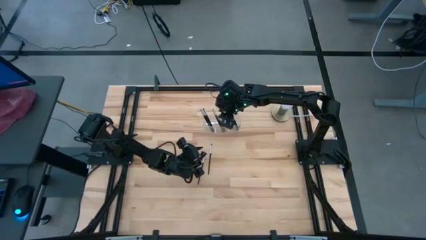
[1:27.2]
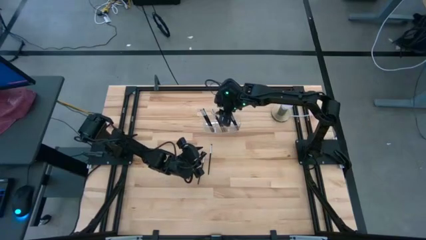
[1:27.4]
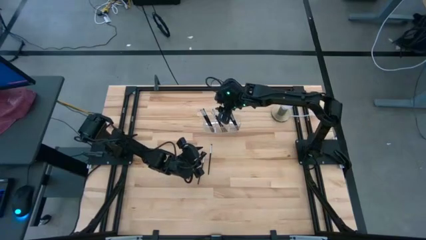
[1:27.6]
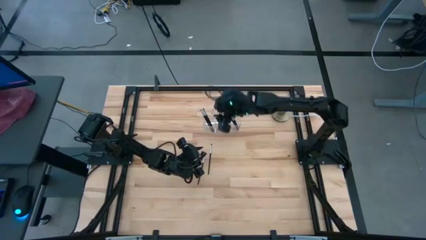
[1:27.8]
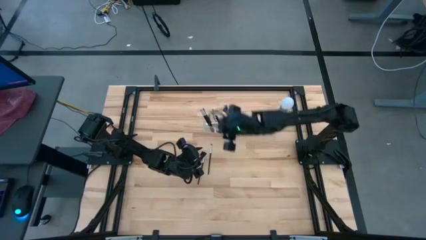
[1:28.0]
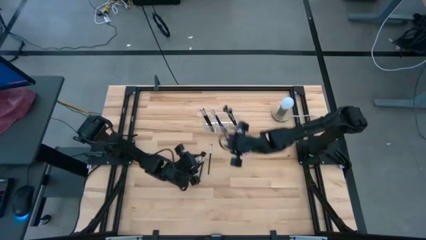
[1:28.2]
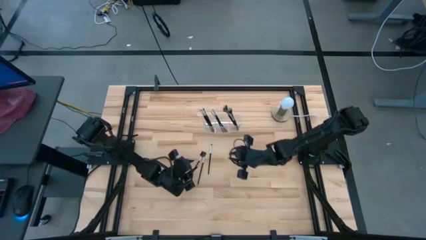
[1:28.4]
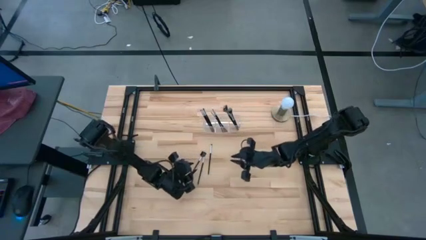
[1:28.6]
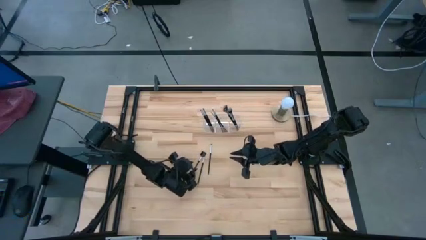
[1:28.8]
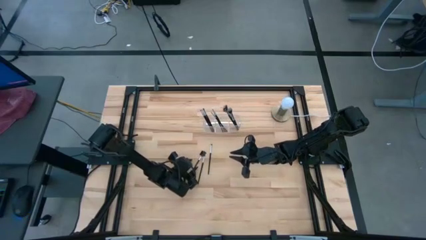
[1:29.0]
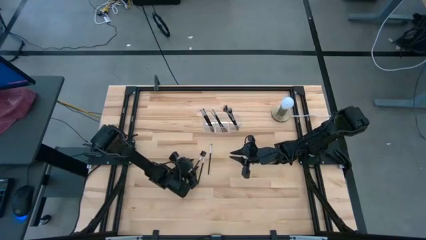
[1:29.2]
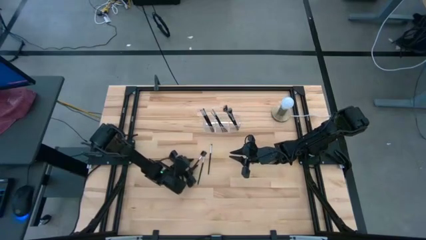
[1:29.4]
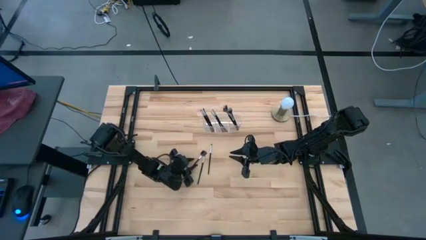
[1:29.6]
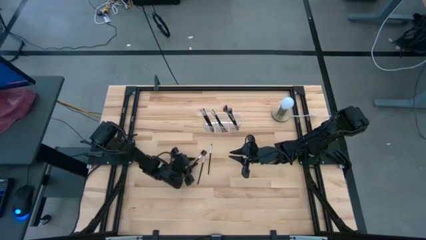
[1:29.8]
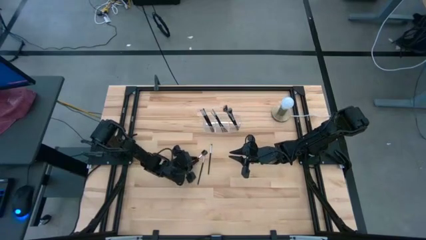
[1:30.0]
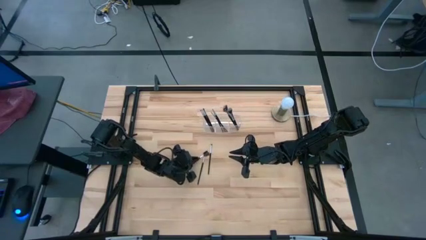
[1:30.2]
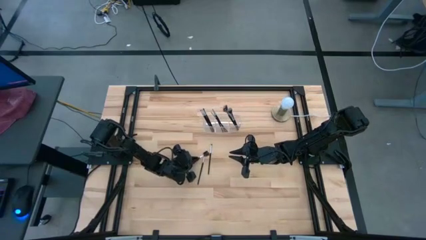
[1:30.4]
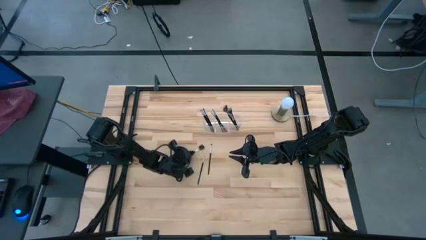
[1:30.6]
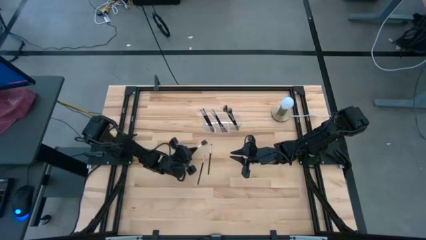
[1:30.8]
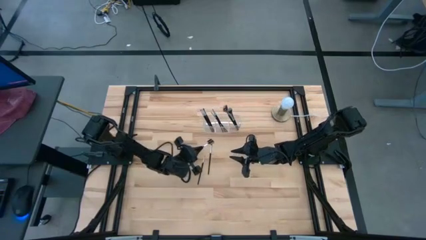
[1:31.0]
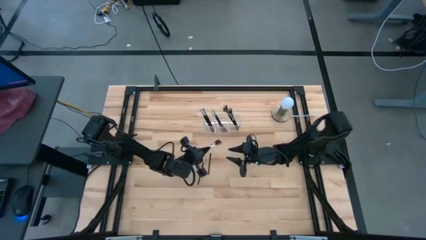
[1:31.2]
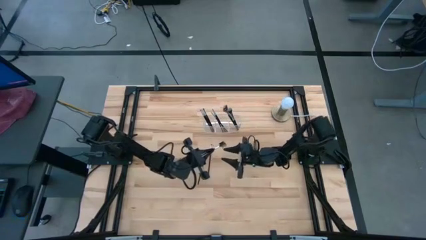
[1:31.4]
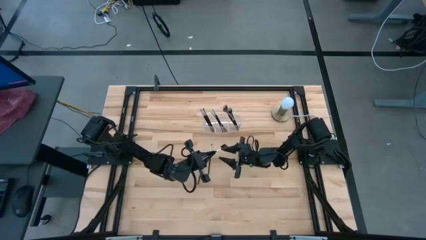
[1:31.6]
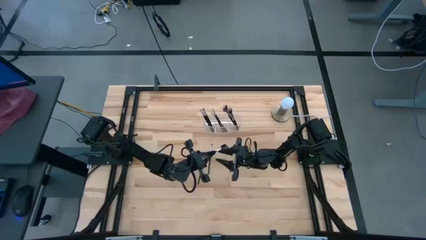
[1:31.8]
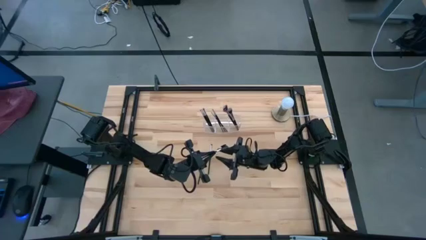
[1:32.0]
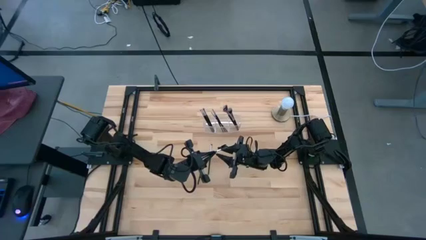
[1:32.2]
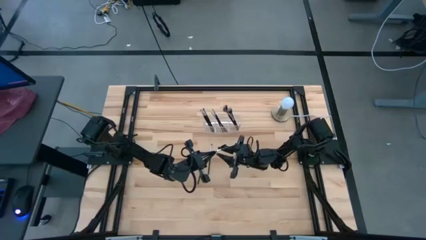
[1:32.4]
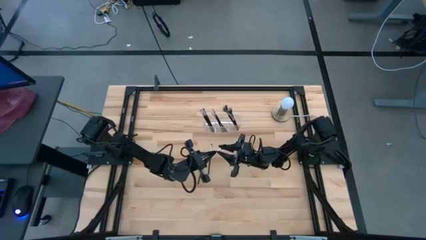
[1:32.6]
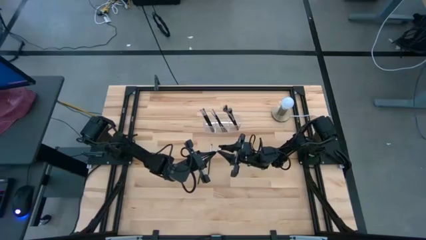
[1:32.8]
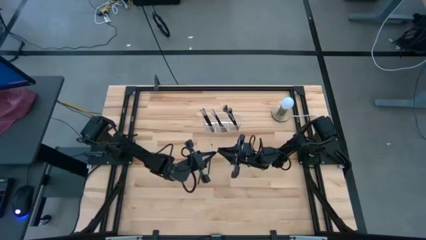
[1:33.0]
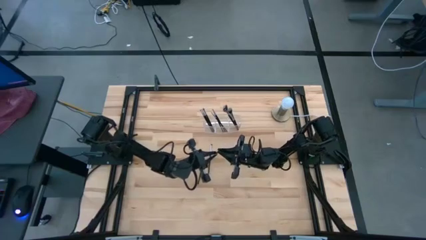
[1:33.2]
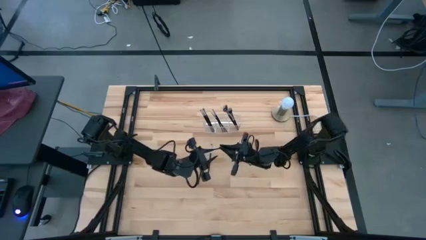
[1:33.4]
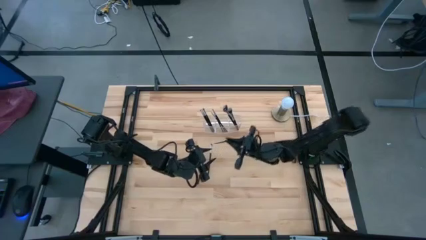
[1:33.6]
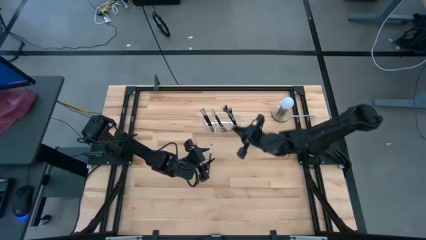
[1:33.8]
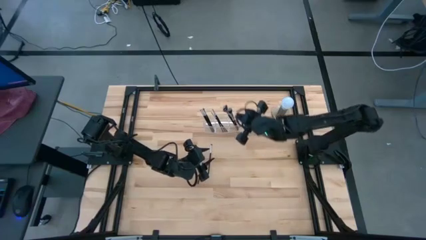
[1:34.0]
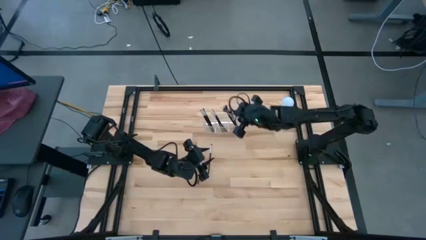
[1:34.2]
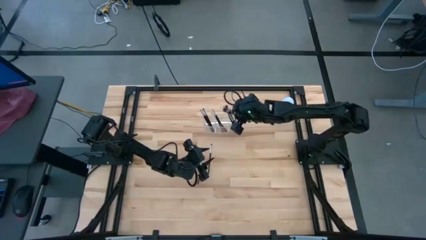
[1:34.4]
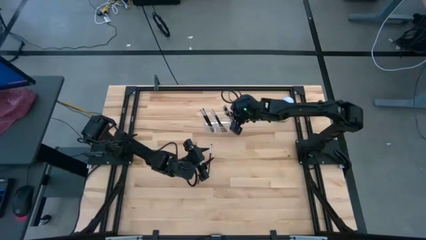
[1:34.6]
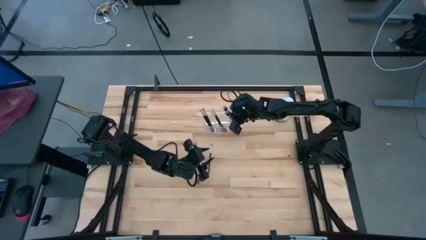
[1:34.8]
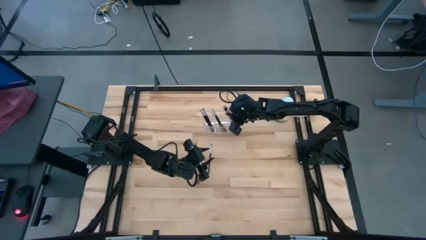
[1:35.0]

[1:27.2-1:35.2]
Task: Put items in baskets/containers
Put the black eyegroomer brush into the transparent organizer

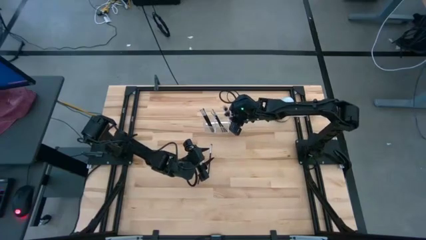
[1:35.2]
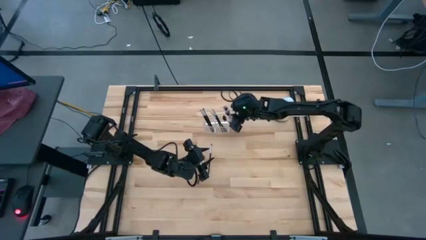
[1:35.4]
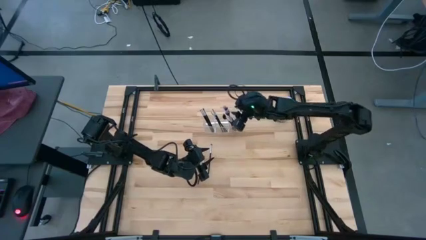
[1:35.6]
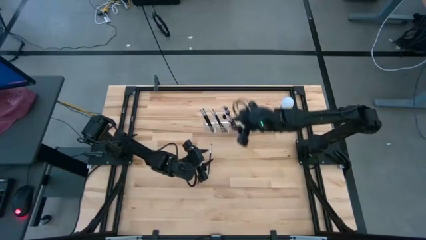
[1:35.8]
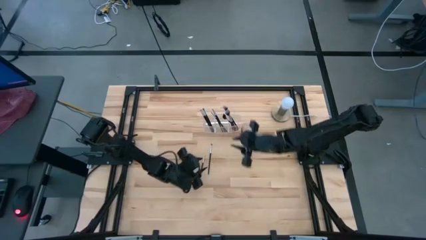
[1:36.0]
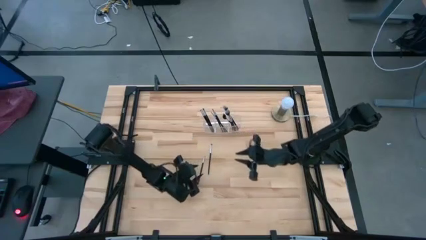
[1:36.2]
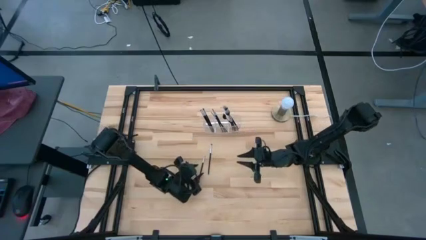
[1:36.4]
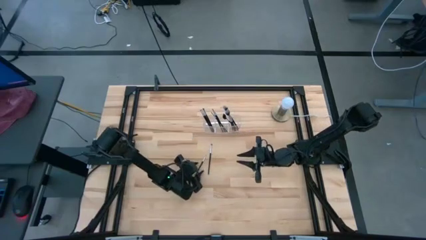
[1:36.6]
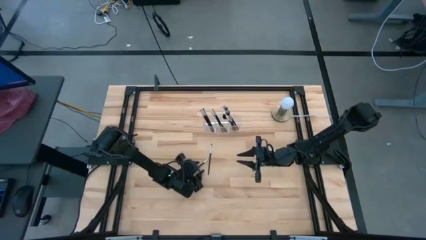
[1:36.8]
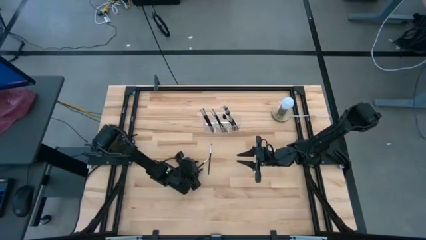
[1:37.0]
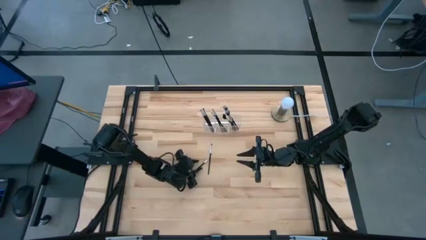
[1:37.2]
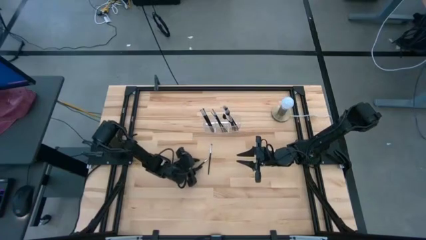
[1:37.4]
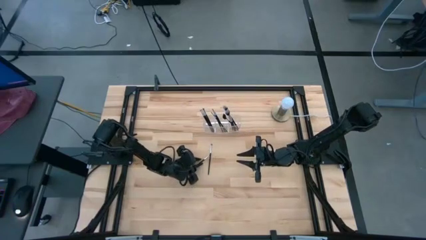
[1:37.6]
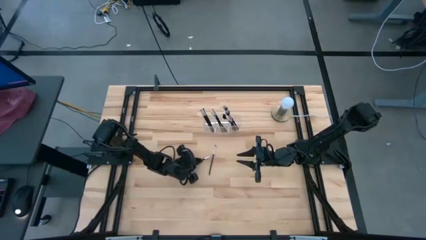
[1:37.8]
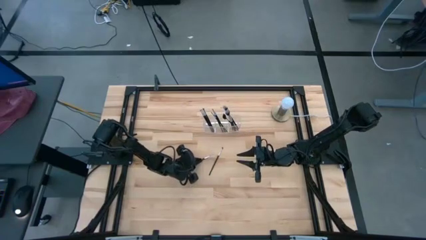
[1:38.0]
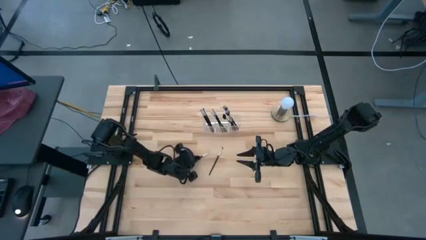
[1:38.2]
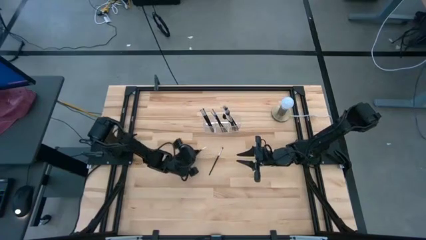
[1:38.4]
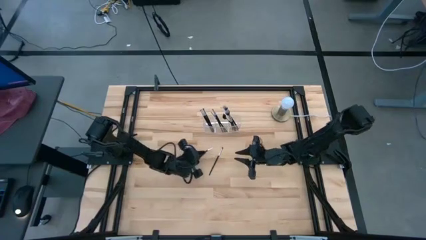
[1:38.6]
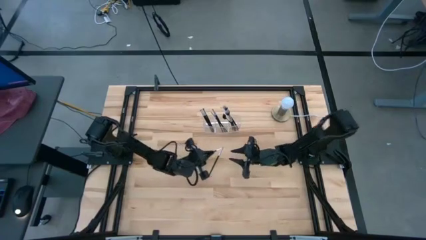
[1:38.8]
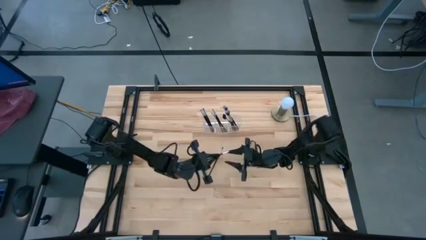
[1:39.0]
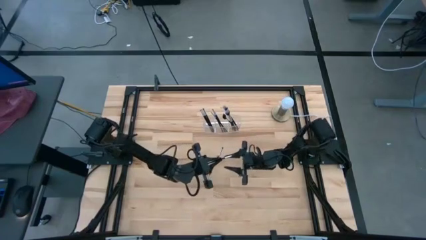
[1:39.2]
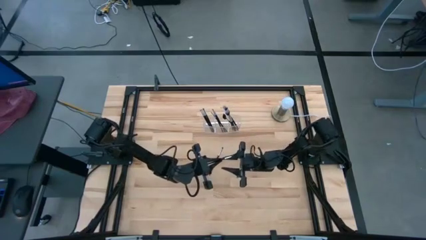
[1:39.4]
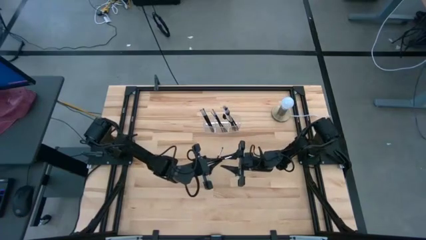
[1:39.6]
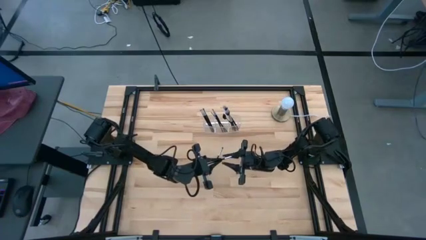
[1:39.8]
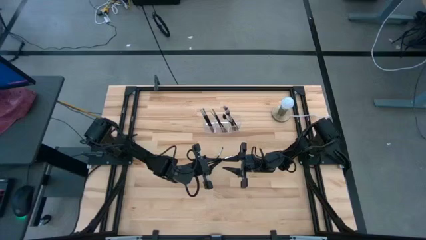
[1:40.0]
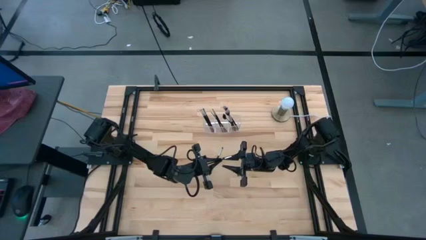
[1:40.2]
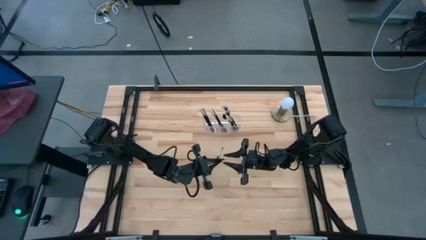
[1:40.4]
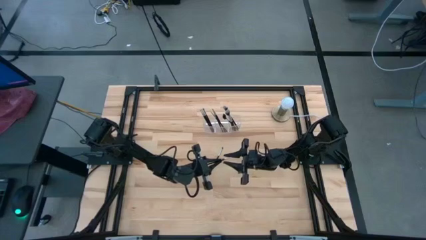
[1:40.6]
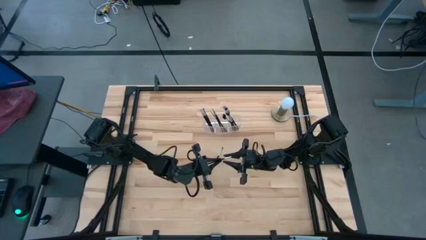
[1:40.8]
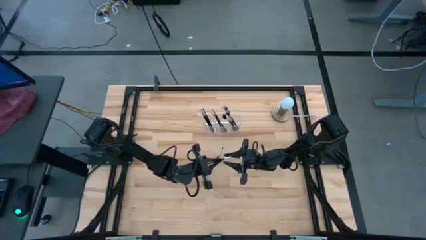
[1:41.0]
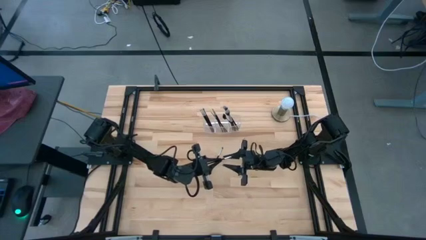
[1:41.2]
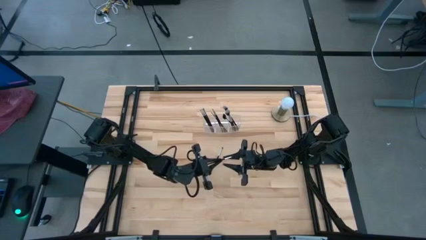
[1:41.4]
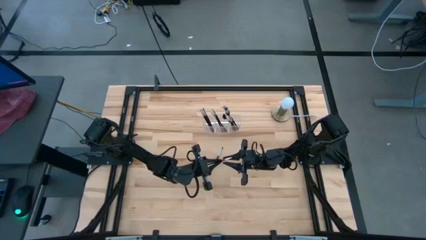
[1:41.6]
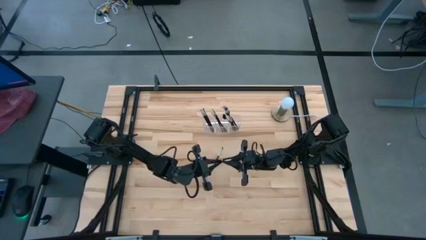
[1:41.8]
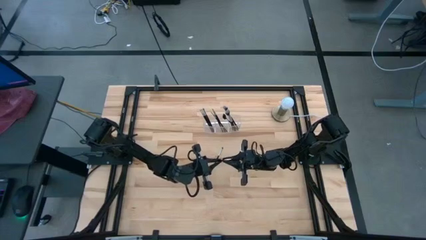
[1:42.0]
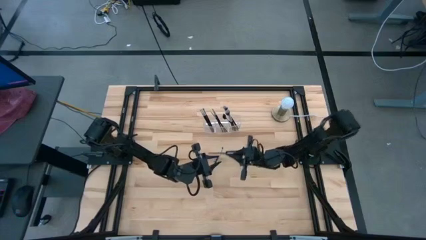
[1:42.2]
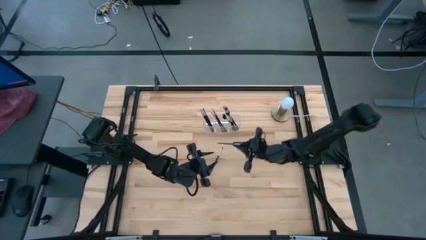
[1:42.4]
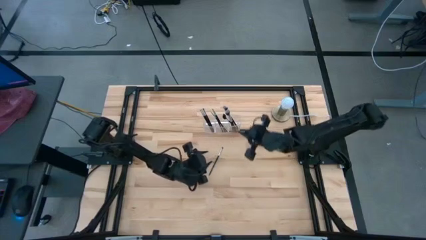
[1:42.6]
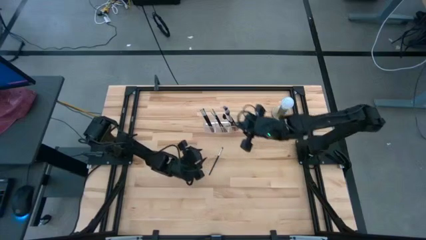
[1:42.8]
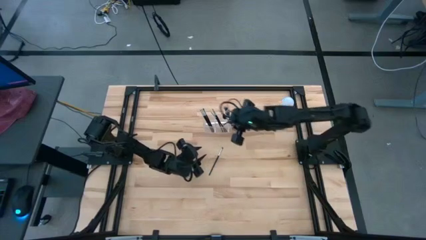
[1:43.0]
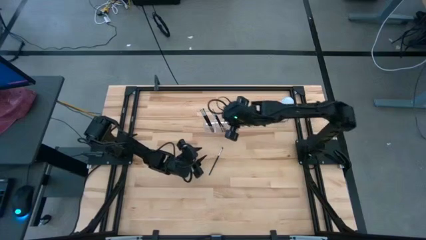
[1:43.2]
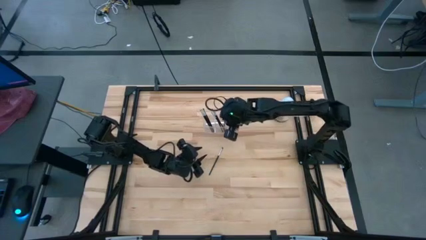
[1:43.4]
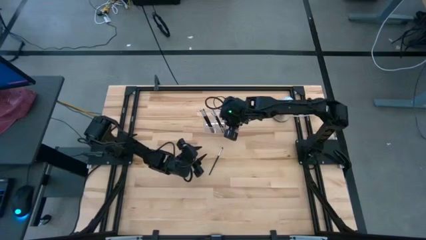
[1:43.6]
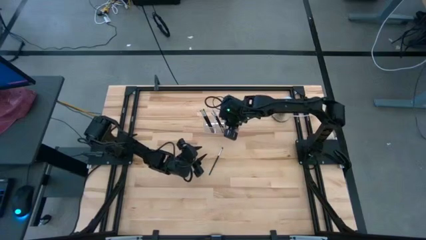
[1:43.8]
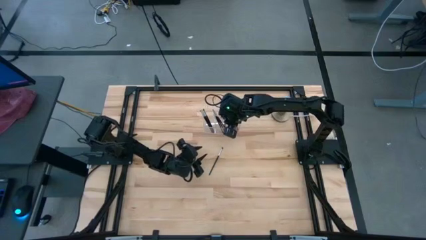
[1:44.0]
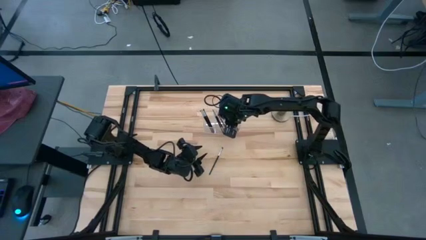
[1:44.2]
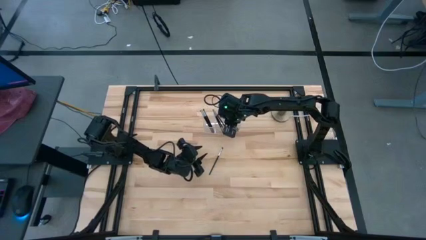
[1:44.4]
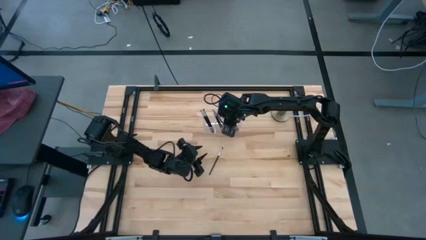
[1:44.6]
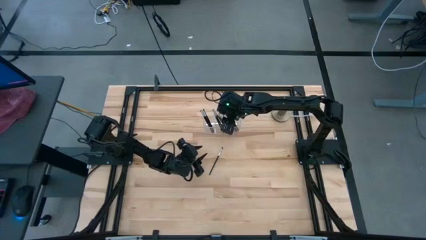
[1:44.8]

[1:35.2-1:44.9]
Put the black liner brush into the transparent organizer
